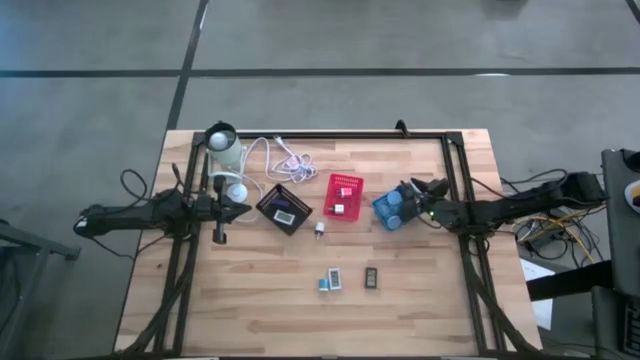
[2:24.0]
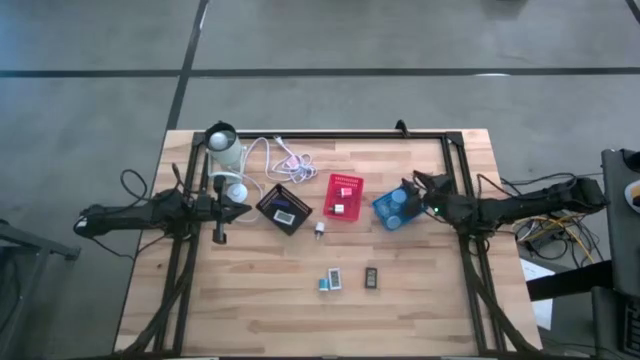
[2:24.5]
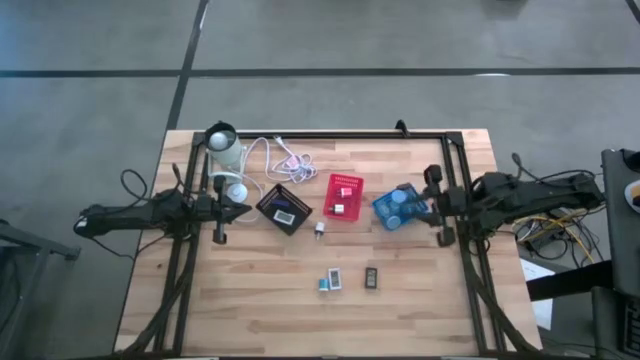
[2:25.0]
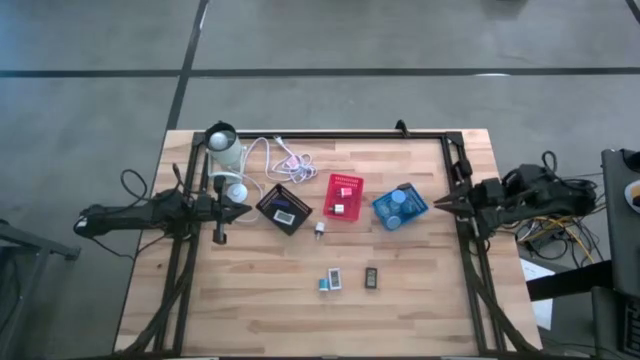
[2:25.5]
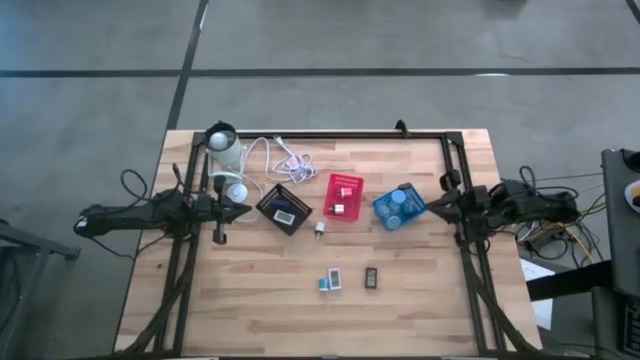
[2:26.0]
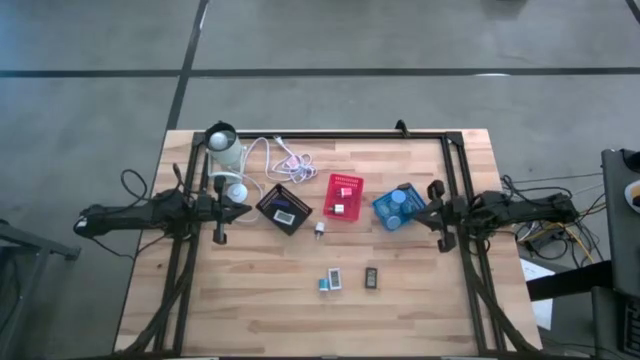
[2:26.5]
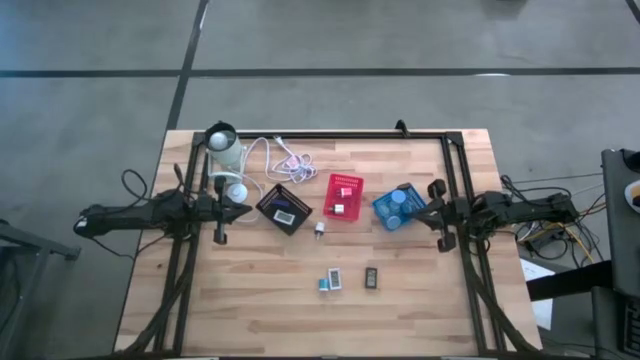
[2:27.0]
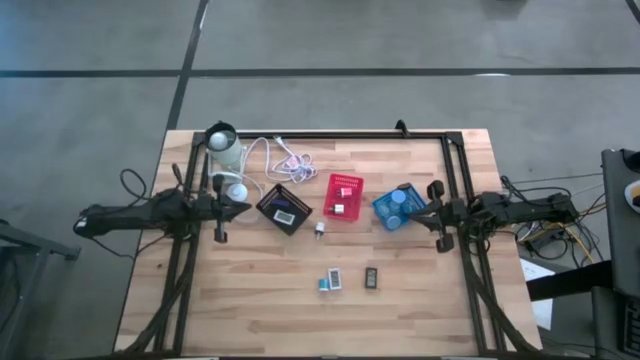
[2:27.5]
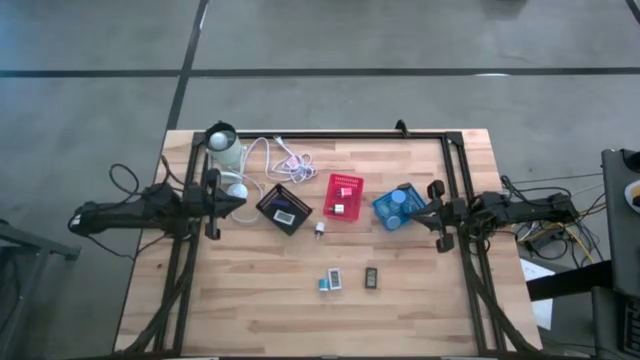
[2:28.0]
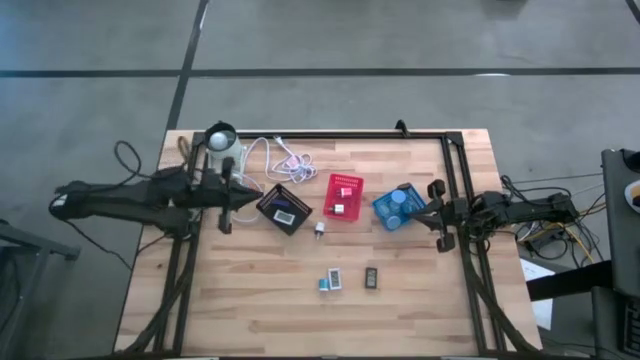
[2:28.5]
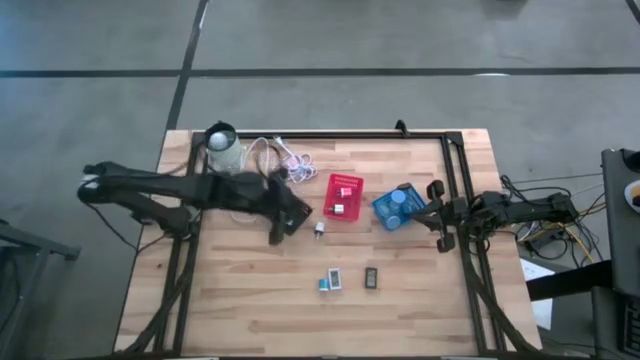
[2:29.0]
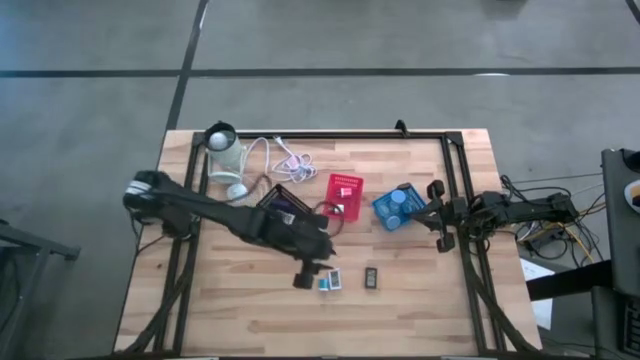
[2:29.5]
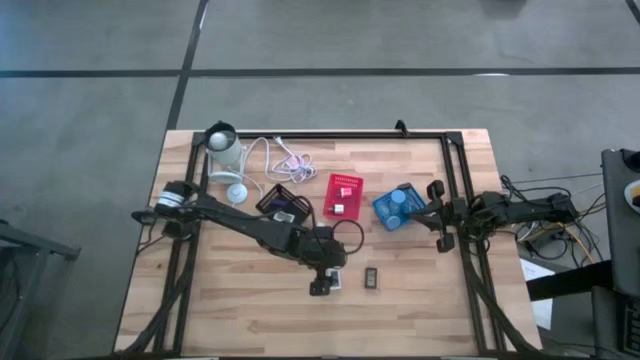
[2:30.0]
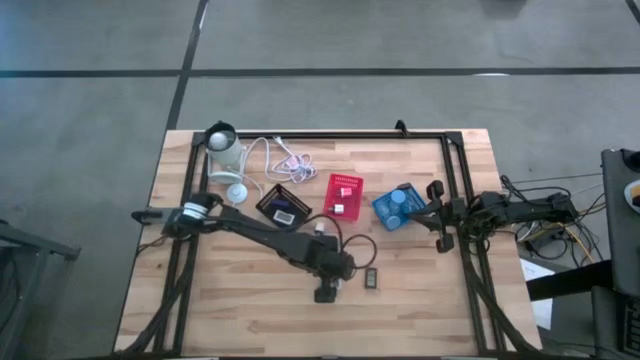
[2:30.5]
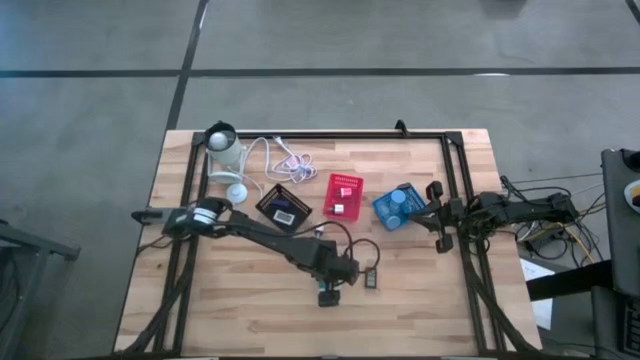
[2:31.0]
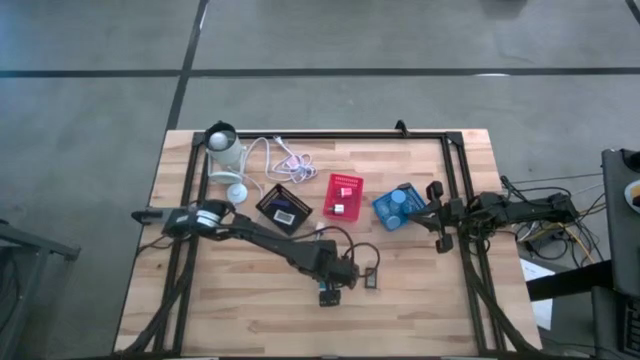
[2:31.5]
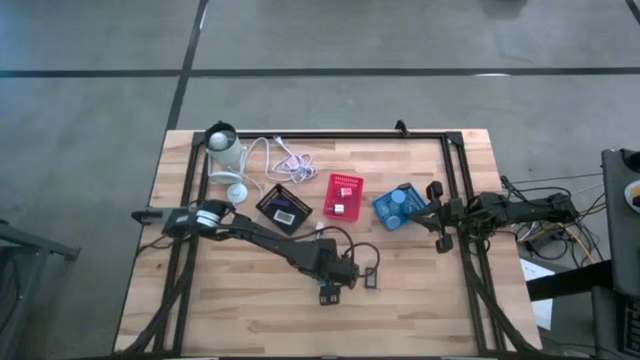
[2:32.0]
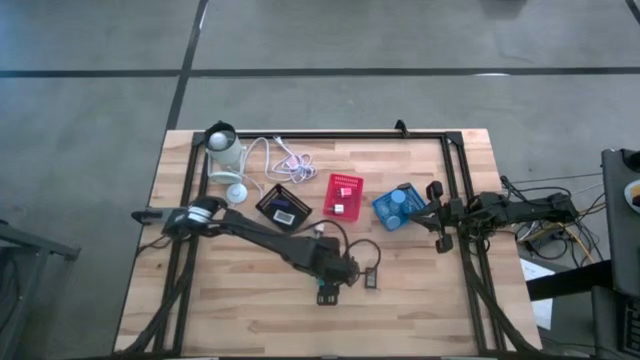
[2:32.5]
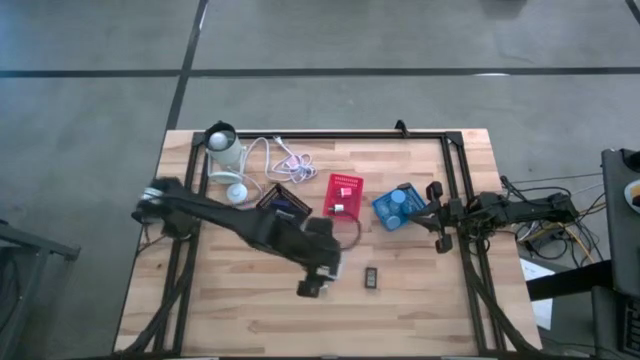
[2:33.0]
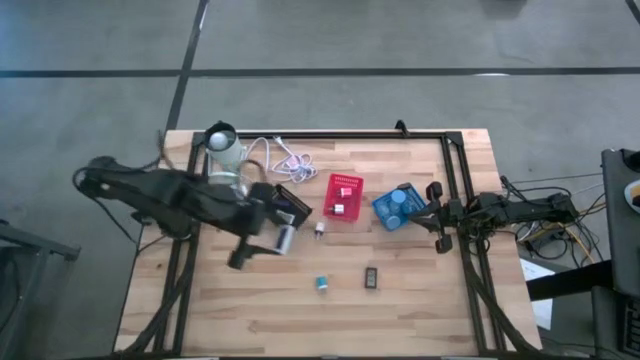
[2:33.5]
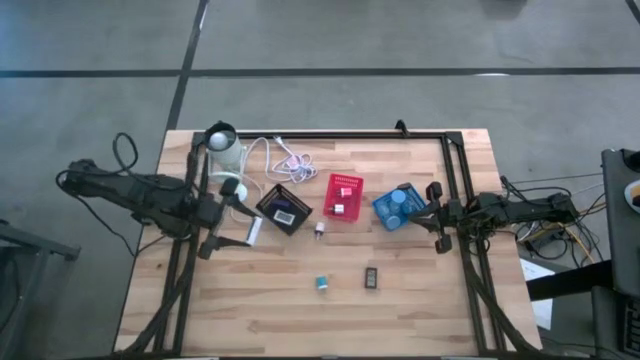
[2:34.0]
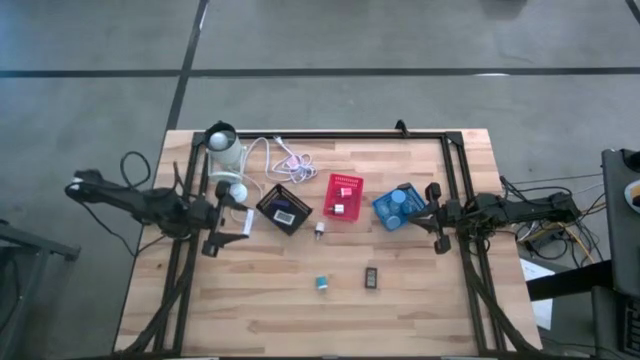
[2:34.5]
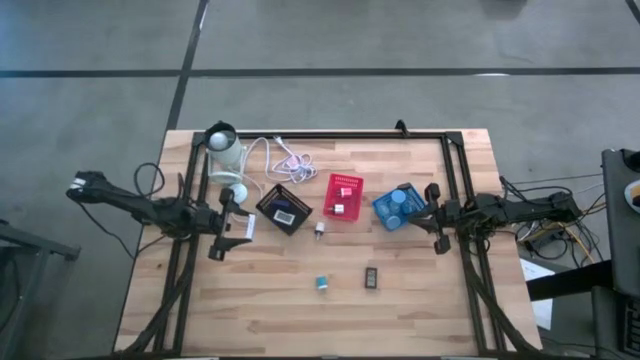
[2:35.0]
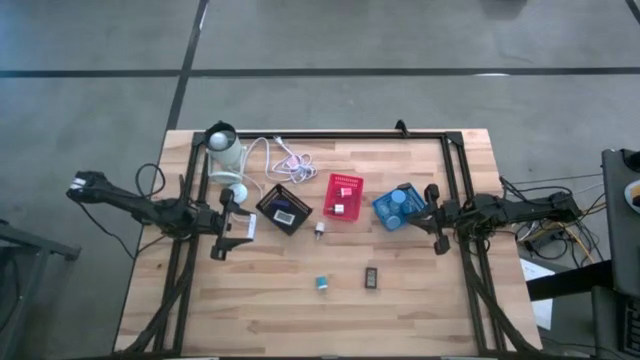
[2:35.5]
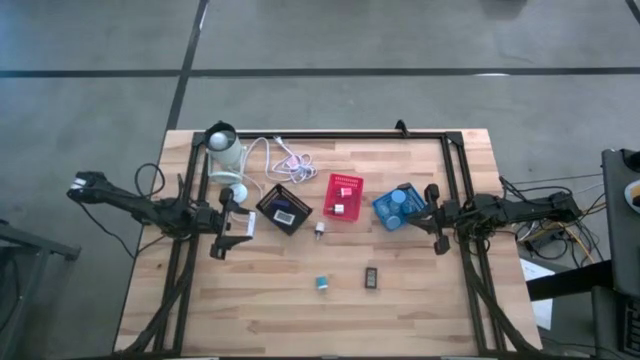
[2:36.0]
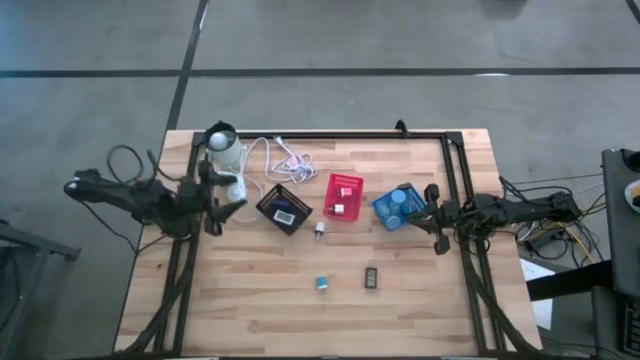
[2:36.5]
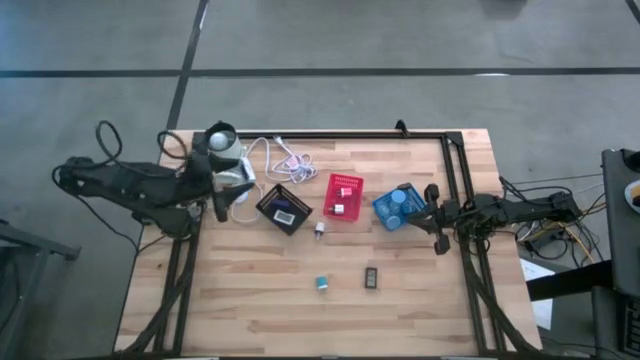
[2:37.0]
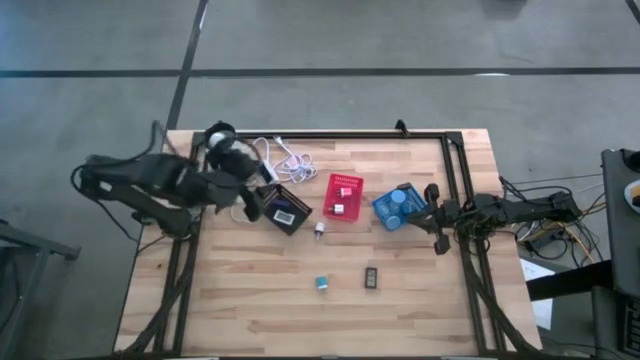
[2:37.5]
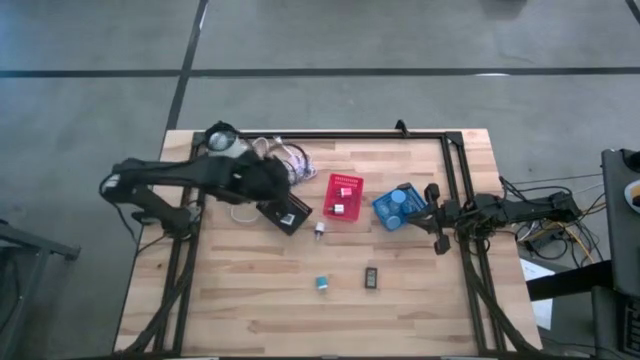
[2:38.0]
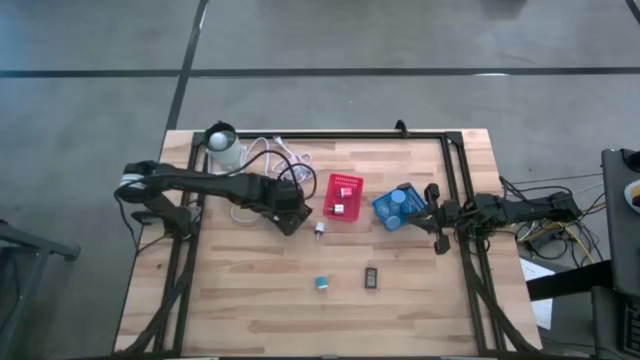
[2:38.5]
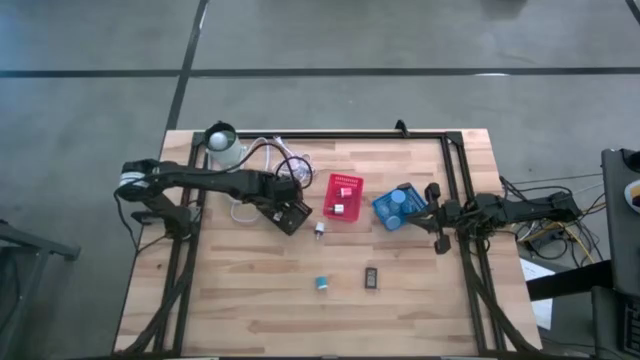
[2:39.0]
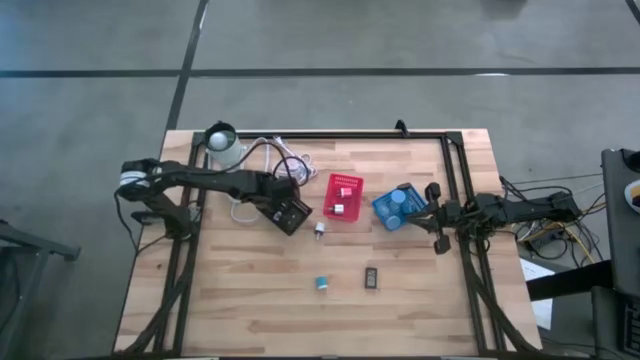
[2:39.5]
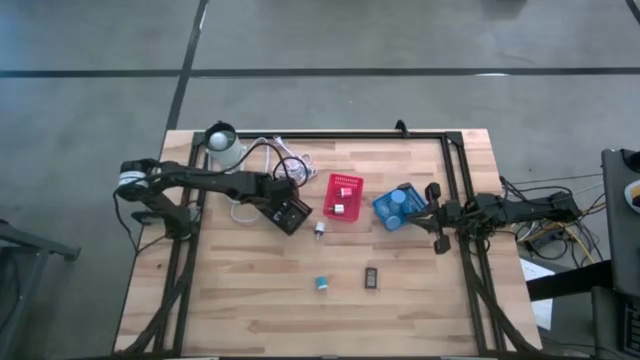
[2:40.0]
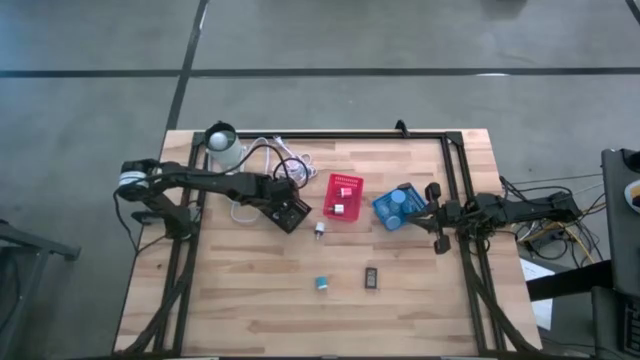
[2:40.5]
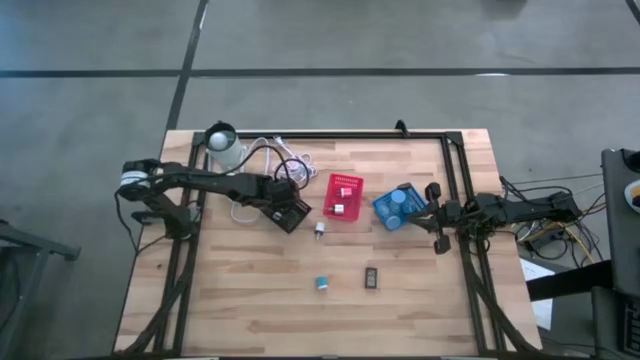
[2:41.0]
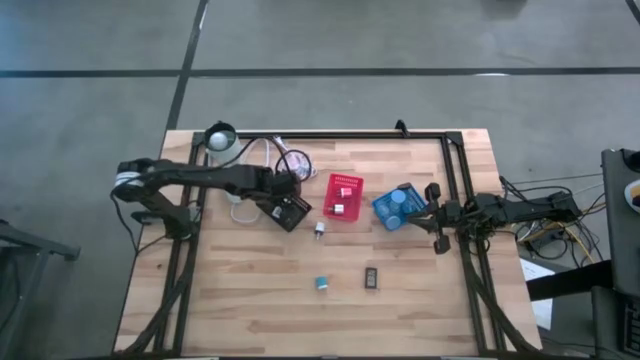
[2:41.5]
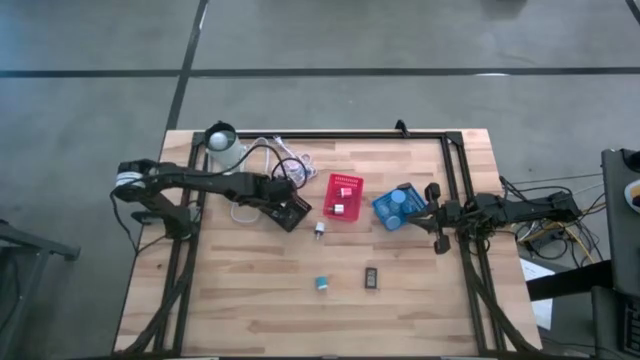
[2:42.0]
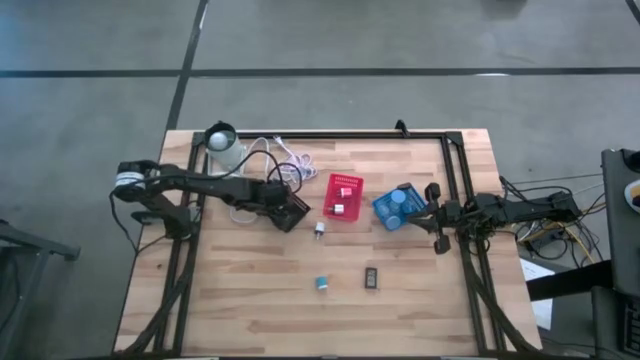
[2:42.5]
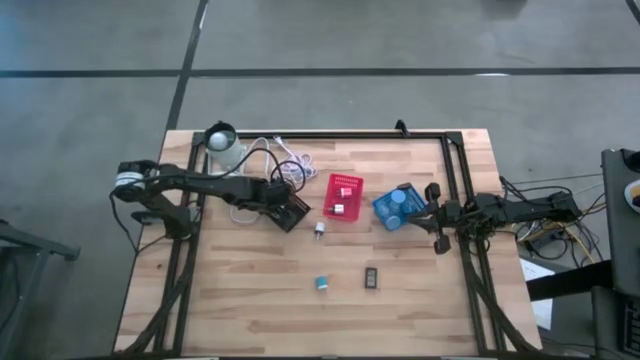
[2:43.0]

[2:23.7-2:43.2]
Task: Pick & Place Office items
Put the white digital clock into the black basket

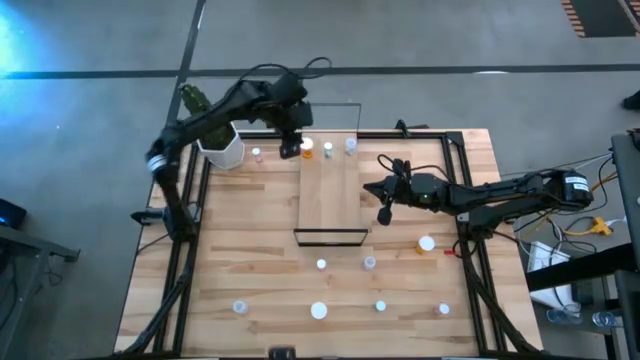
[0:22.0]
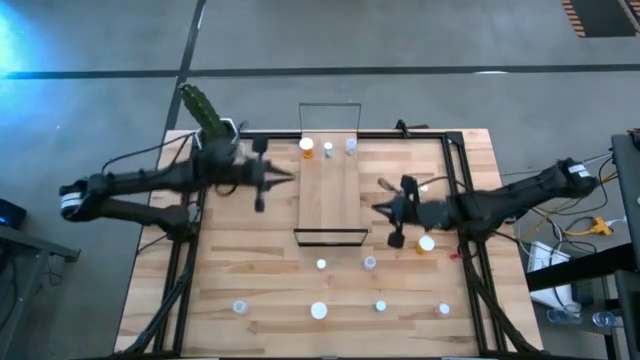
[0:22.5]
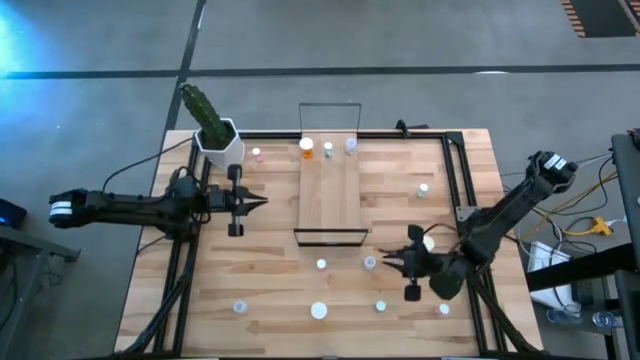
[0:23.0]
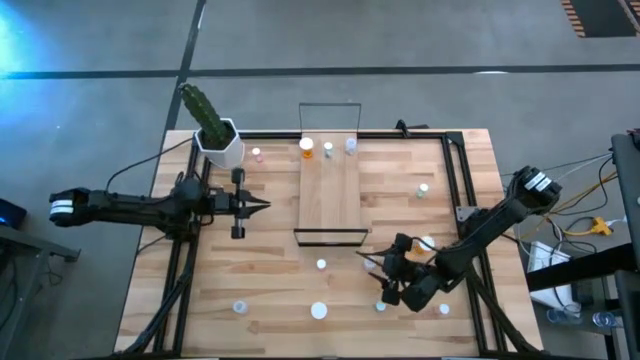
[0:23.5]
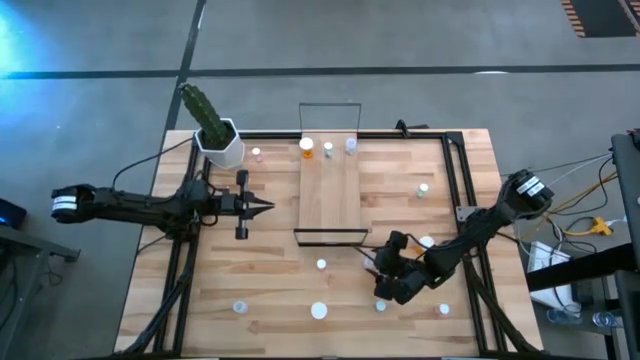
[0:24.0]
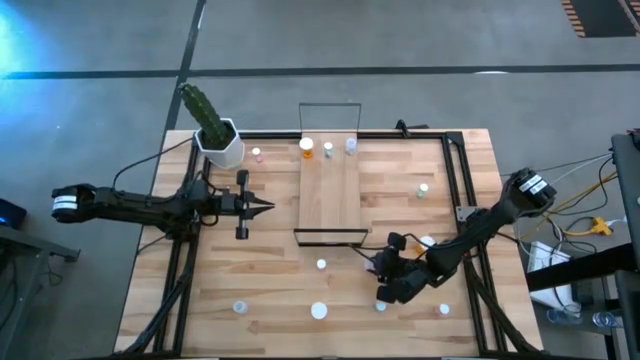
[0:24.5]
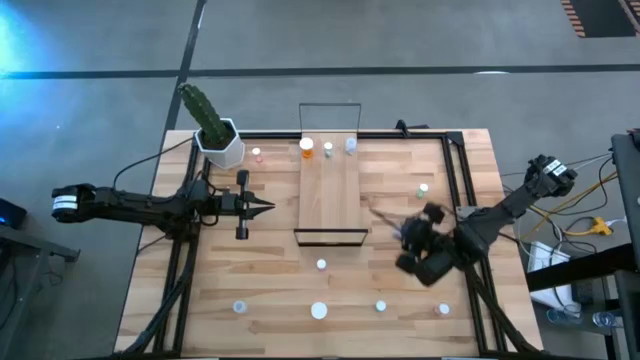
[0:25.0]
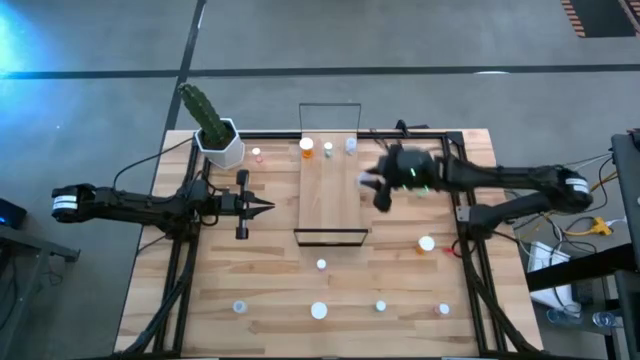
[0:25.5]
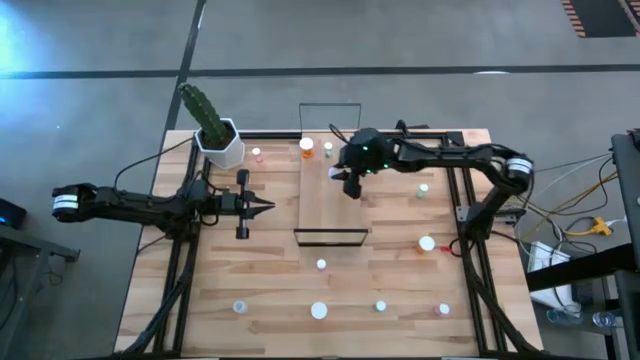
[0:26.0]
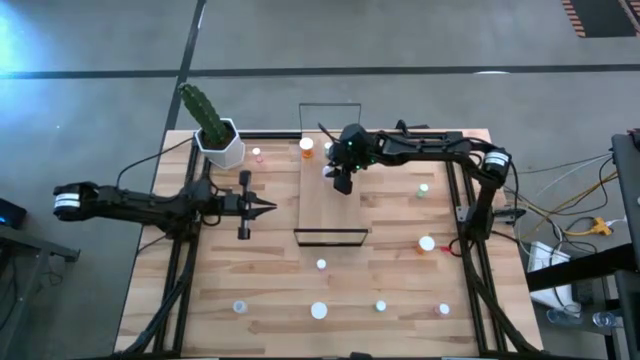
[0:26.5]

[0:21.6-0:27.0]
Task: Pick and place medicine bottles onto shelf by color
Put the white pill bottle on the shelf
